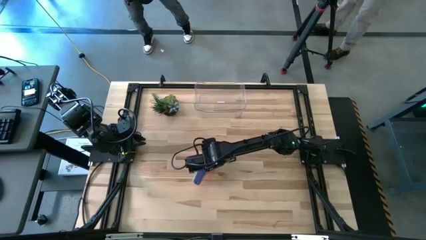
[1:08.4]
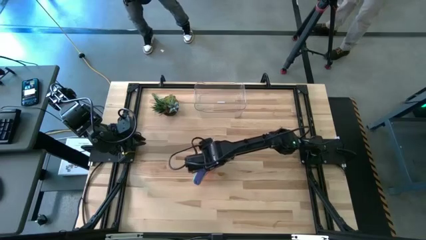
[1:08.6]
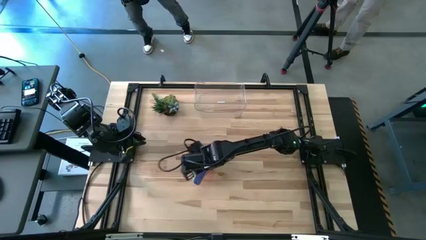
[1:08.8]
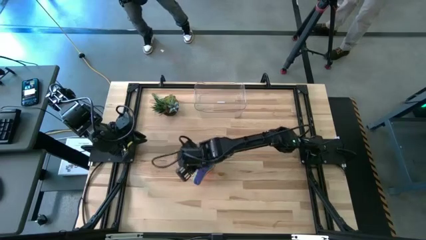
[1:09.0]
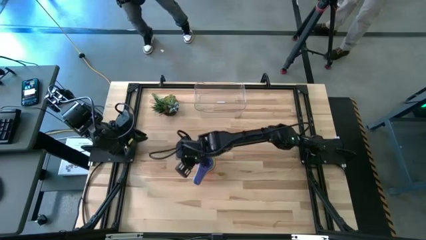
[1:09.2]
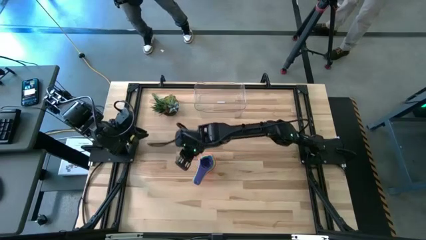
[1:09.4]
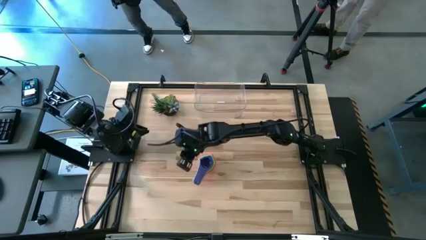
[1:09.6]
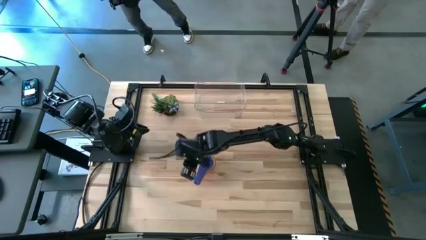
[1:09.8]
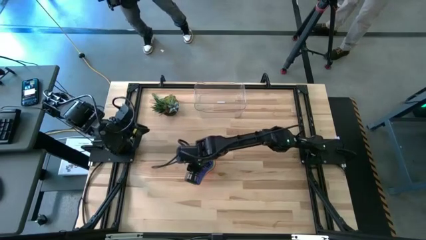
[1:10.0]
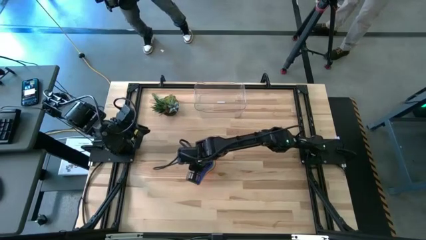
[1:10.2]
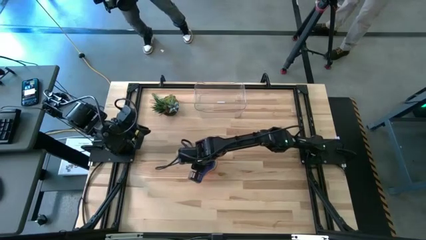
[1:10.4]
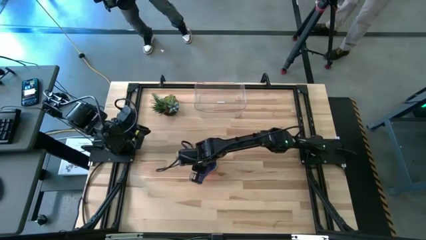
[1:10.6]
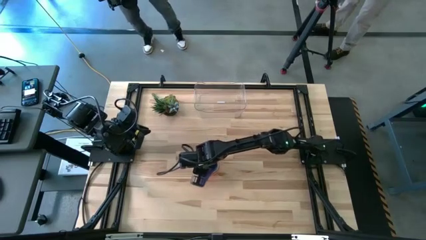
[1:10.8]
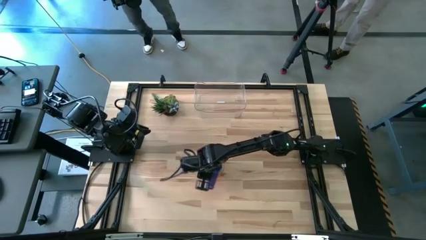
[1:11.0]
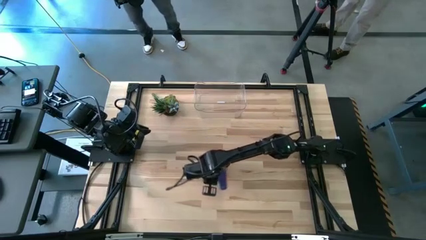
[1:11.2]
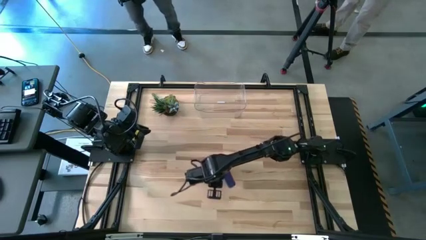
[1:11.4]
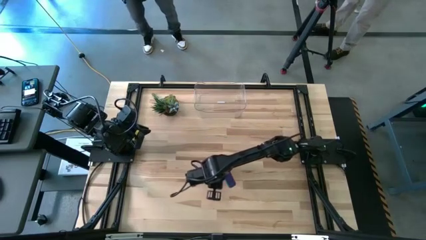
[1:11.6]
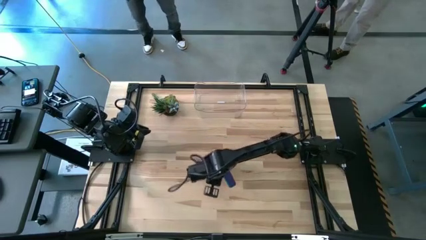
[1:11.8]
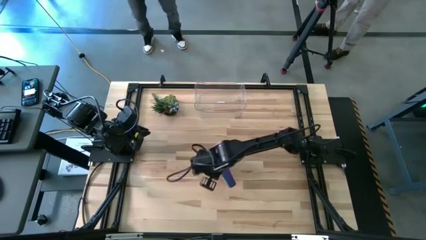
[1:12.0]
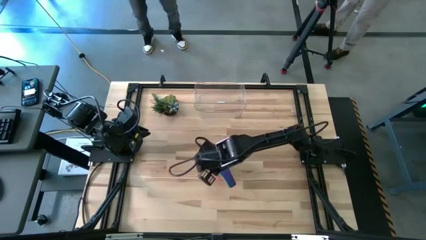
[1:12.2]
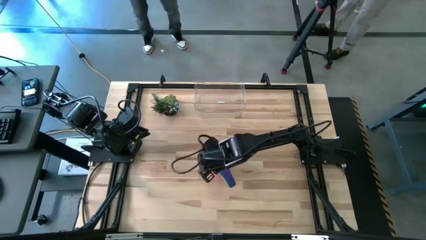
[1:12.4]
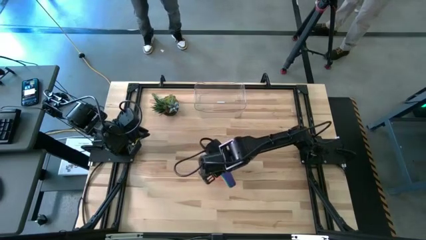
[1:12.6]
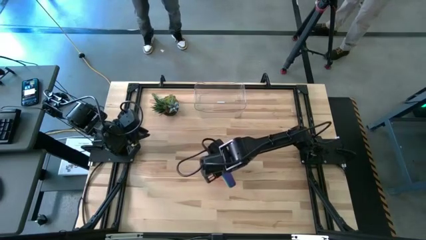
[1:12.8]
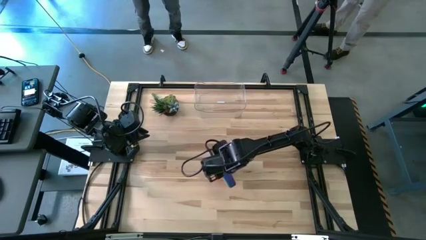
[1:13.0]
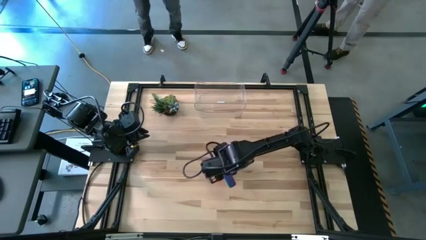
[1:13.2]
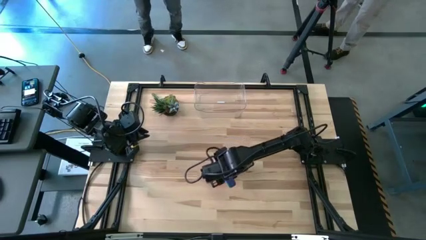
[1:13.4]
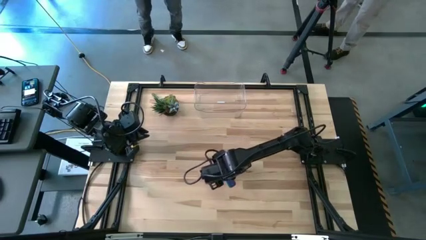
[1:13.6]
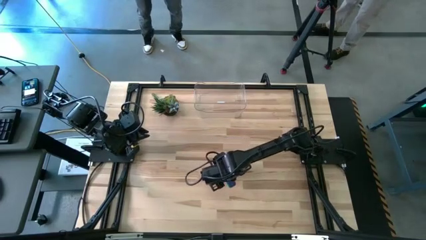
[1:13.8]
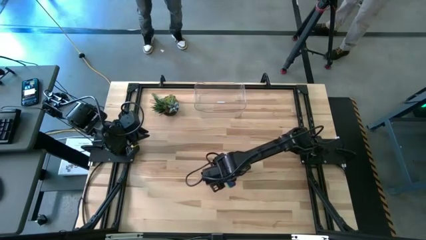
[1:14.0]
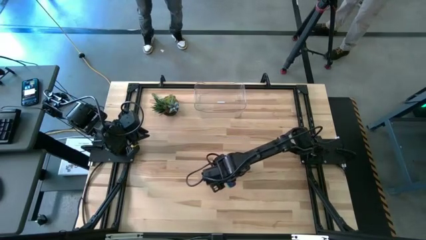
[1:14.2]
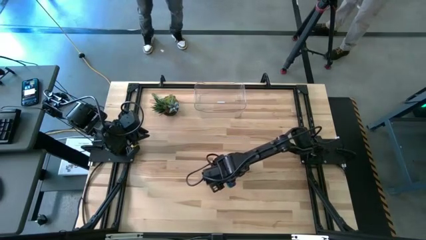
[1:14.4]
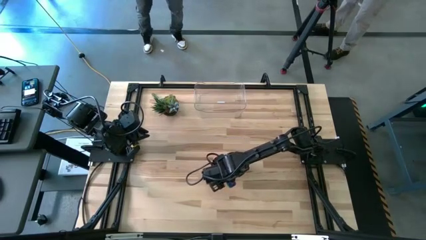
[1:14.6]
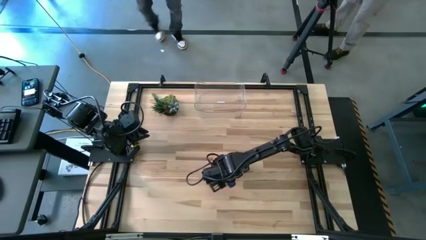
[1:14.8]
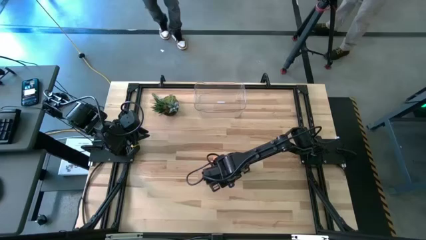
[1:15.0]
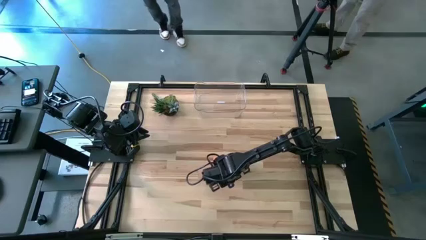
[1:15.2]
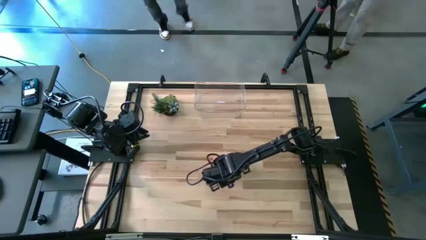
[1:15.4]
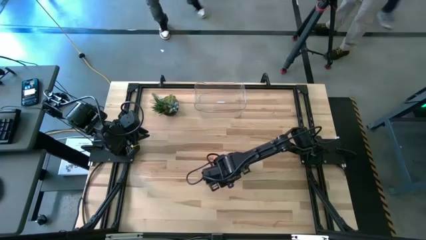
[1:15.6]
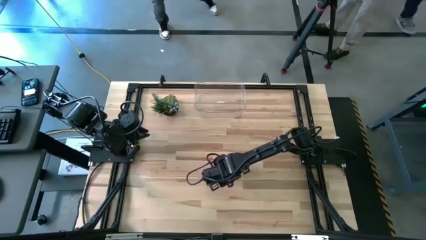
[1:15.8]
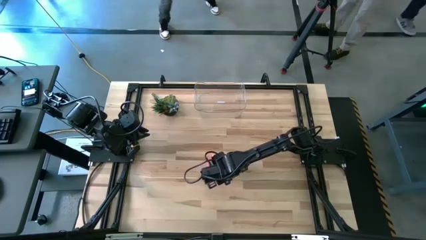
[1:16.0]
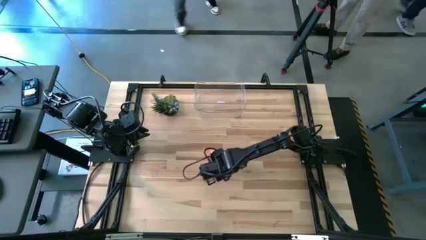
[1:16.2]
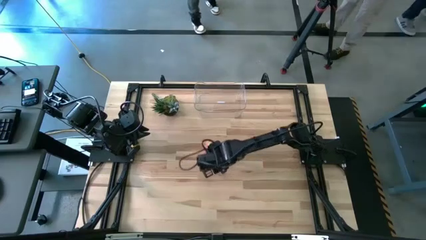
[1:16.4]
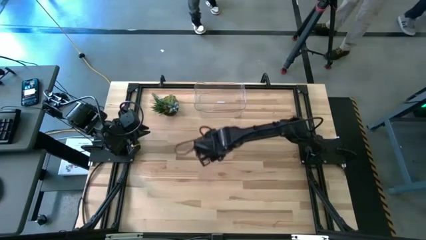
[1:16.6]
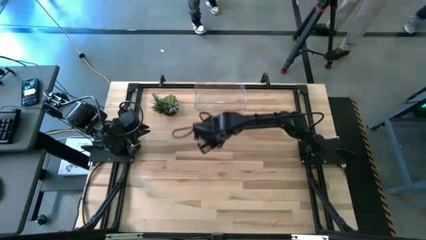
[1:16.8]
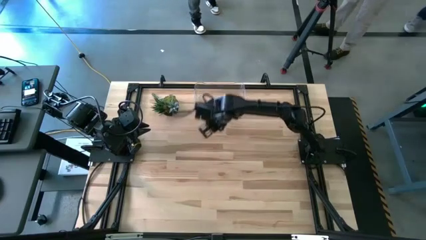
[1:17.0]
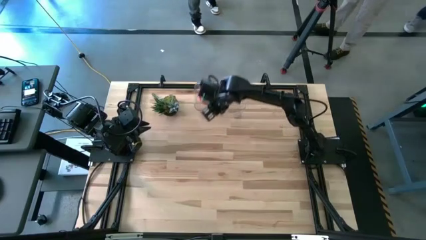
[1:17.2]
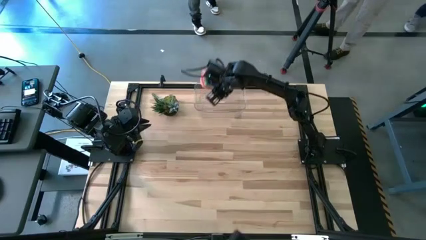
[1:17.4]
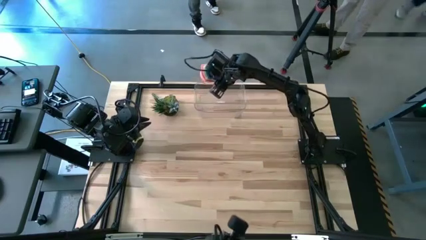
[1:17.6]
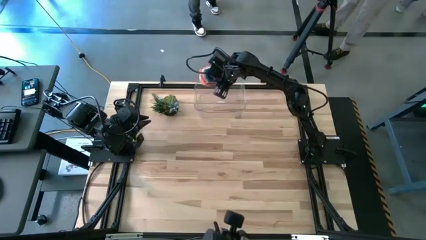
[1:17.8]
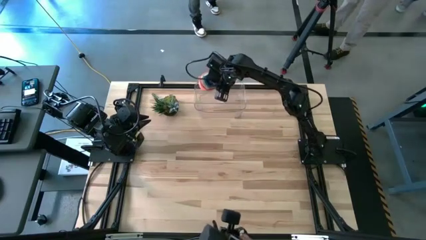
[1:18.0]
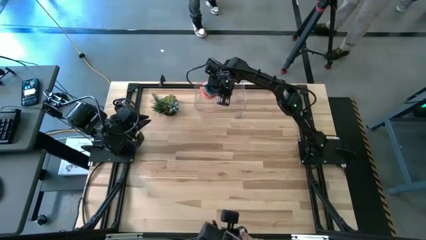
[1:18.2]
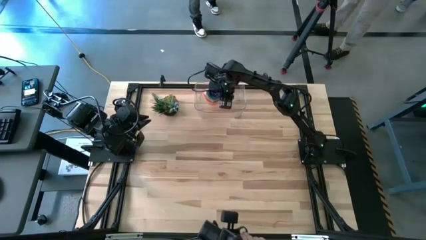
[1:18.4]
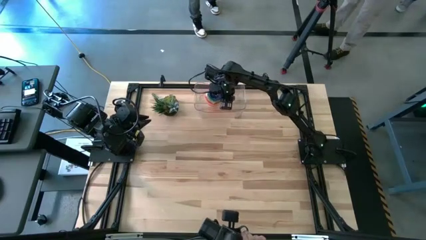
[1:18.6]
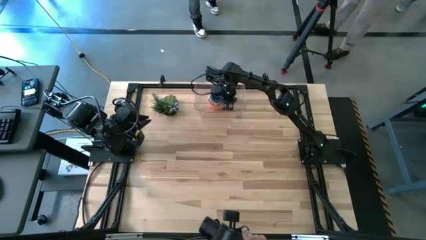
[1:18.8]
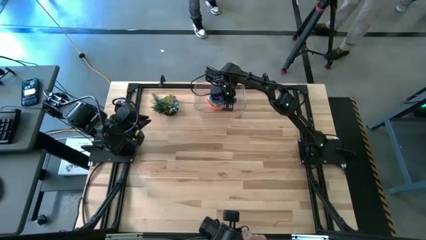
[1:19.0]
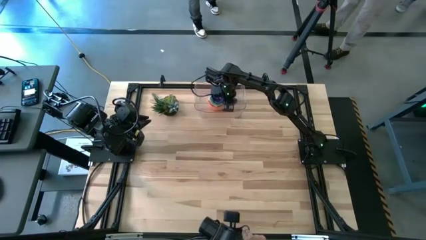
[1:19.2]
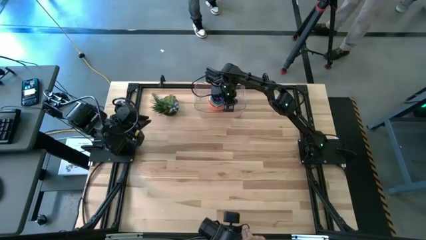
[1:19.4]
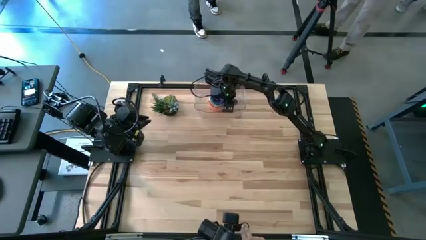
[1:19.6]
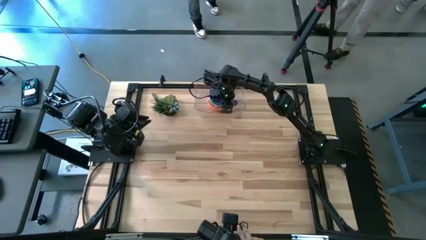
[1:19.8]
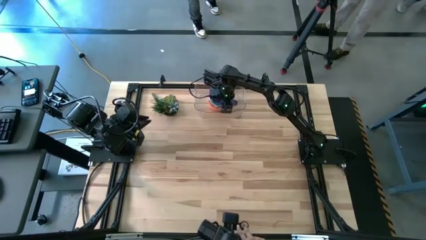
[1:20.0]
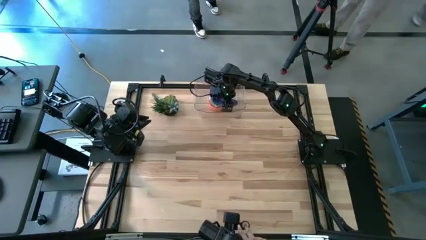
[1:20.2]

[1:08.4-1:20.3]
Task: Nest measuring cups in basket
Put the stacked measuring cups into the transparent bin

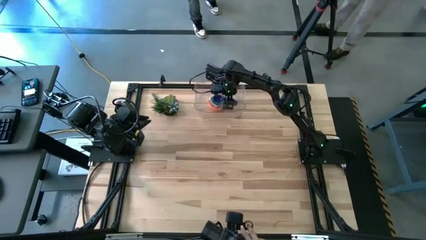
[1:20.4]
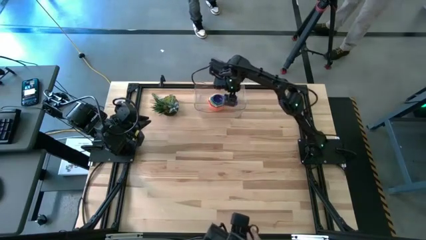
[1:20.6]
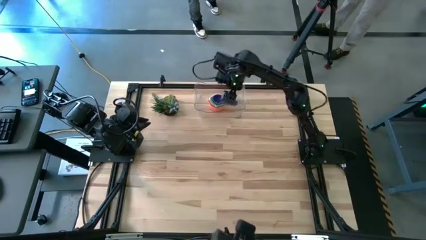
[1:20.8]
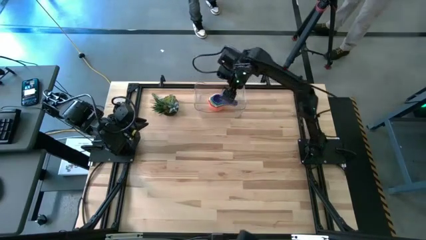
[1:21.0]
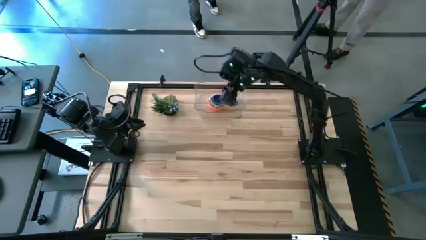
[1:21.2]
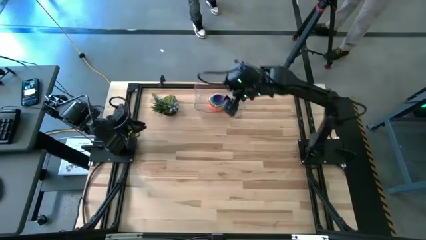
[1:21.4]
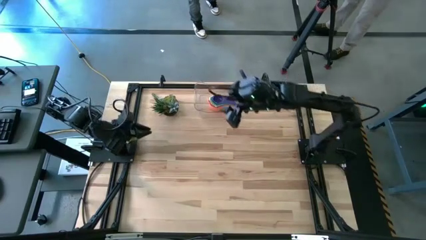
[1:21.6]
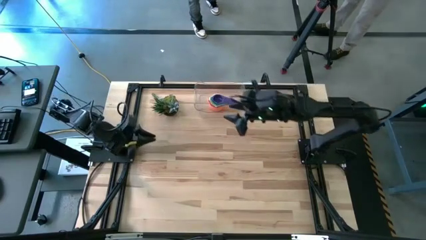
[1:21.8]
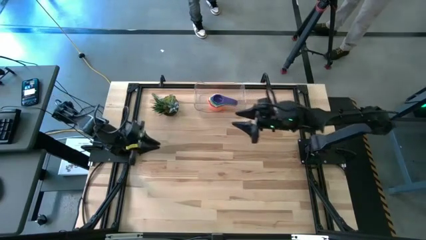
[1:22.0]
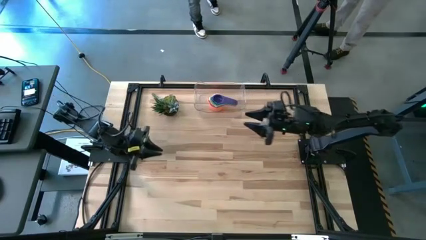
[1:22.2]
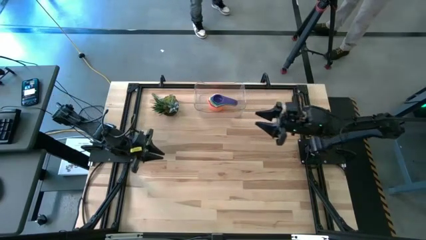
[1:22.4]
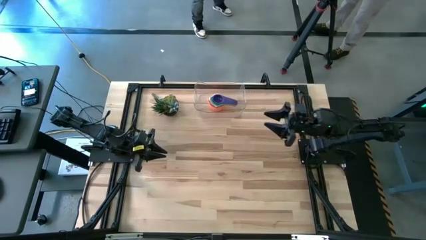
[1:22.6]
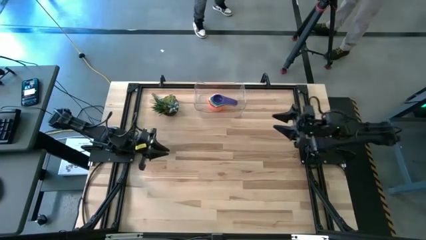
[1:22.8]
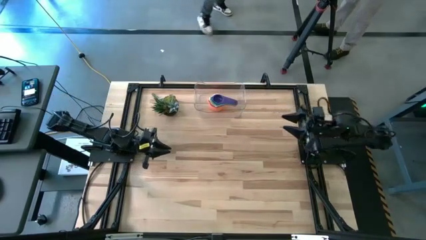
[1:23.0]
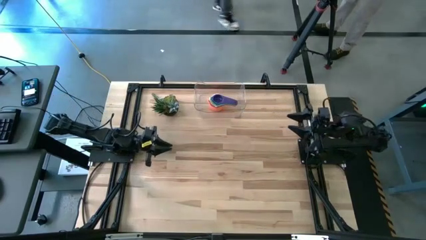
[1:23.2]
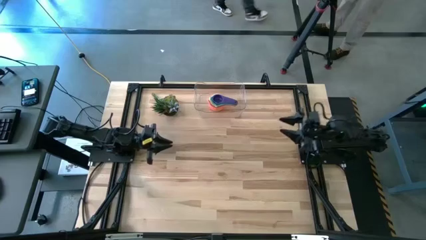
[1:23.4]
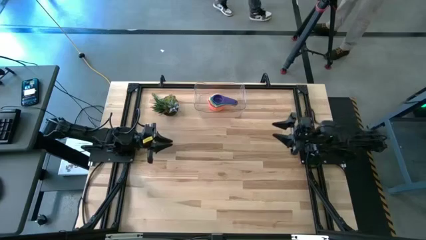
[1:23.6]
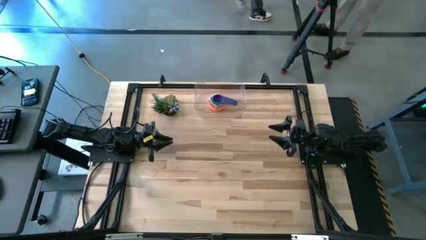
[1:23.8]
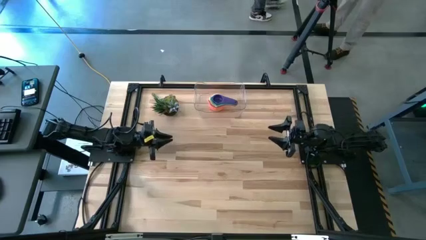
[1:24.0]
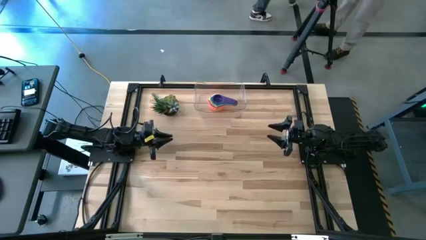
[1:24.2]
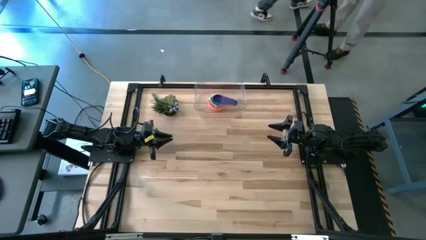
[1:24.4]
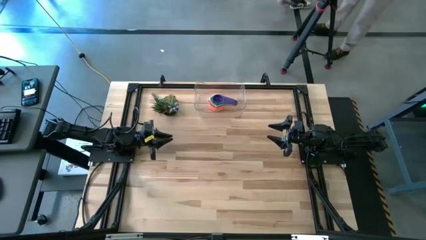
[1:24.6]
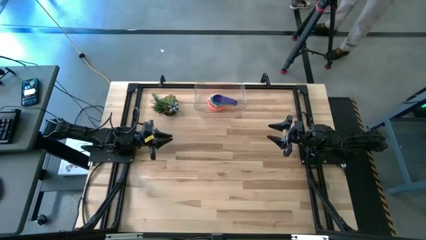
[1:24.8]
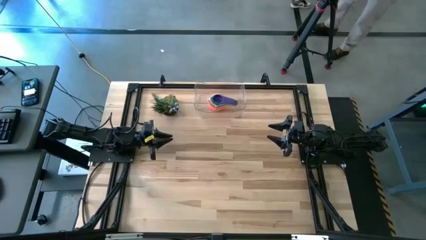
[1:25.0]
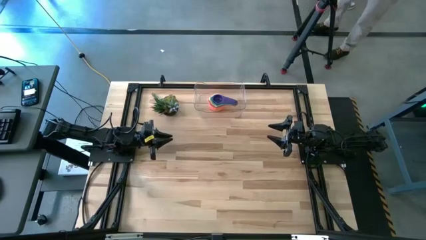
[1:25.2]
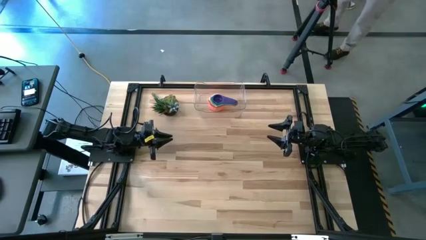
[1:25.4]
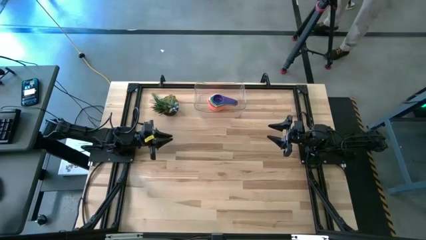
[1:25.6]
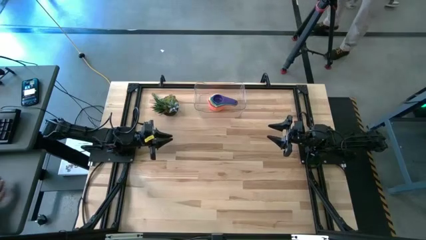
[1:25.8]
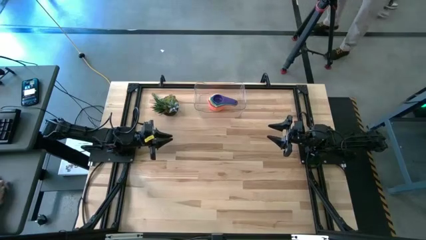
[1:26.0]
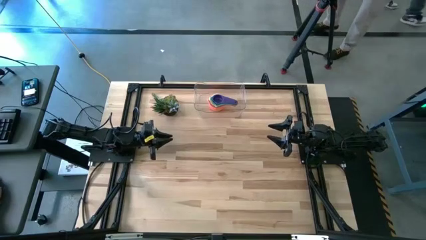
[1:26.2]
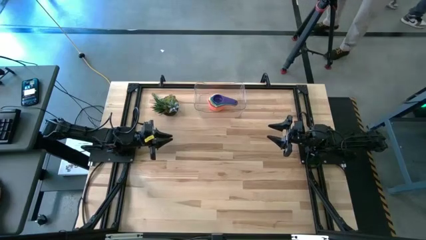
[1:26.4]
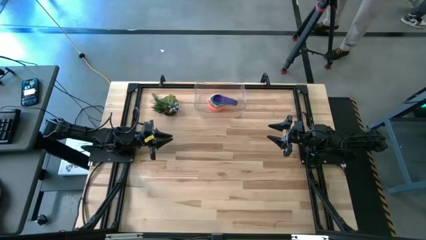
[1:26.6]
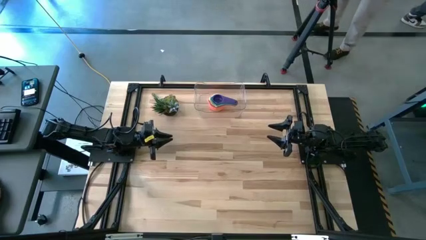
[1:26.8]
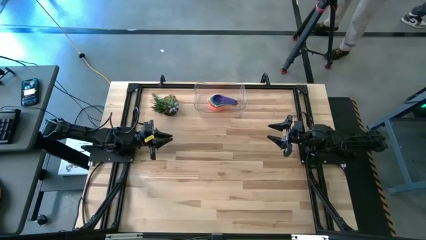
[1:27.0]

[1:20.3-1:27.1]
Return to Home Position
